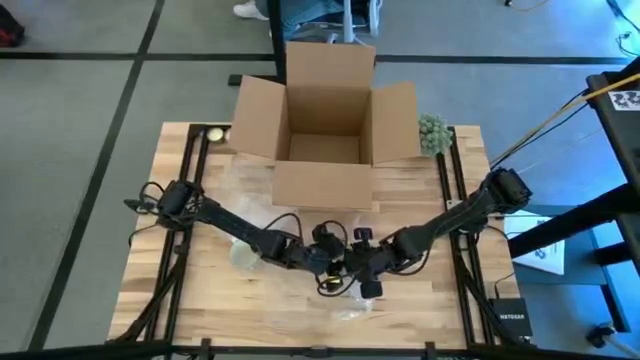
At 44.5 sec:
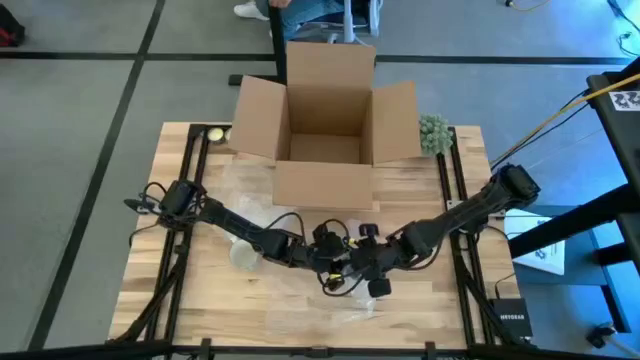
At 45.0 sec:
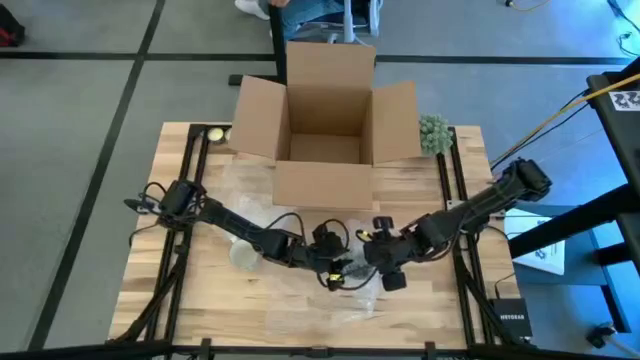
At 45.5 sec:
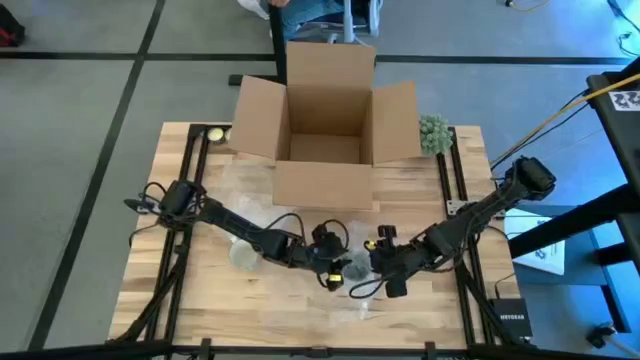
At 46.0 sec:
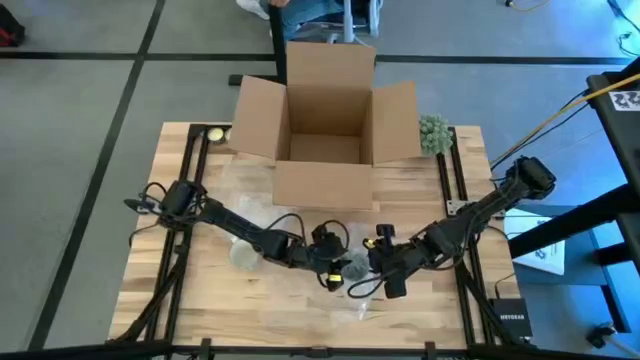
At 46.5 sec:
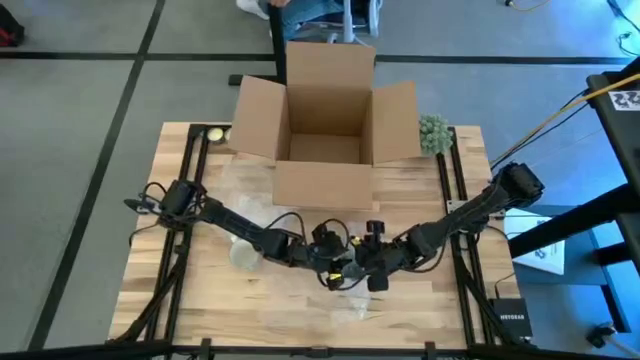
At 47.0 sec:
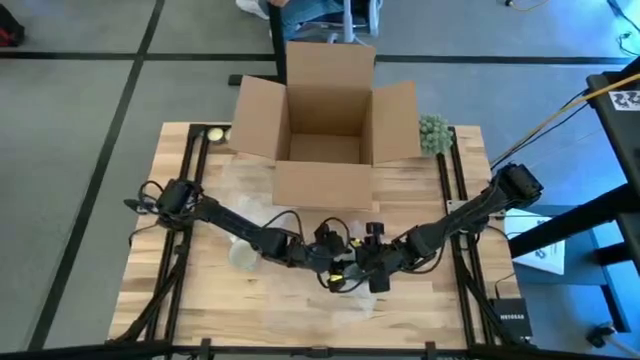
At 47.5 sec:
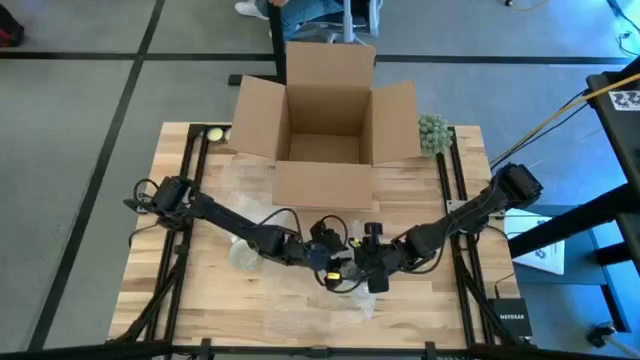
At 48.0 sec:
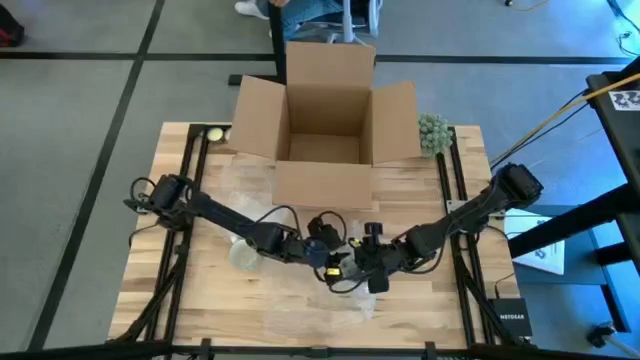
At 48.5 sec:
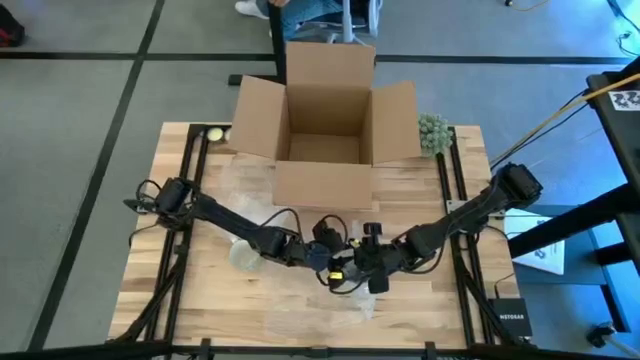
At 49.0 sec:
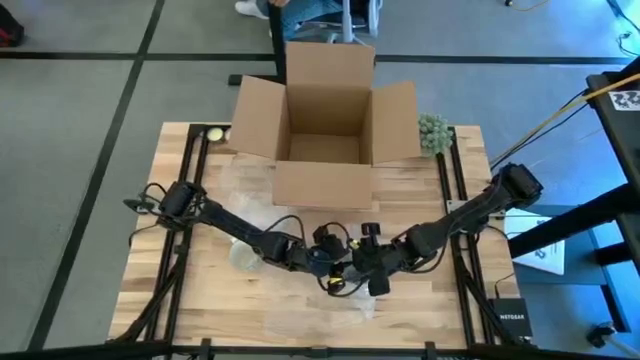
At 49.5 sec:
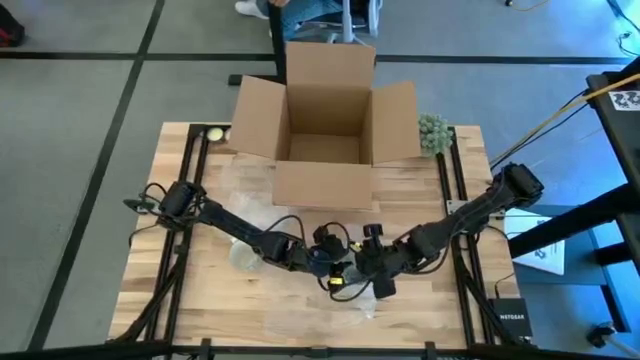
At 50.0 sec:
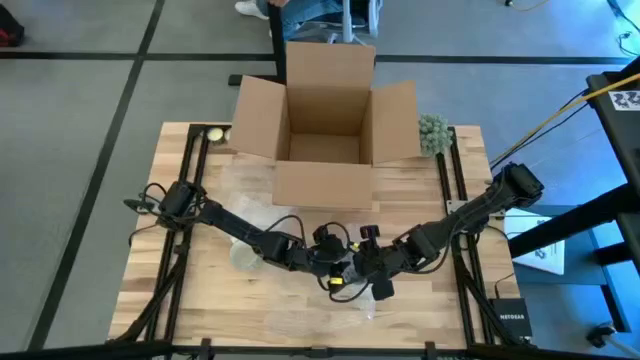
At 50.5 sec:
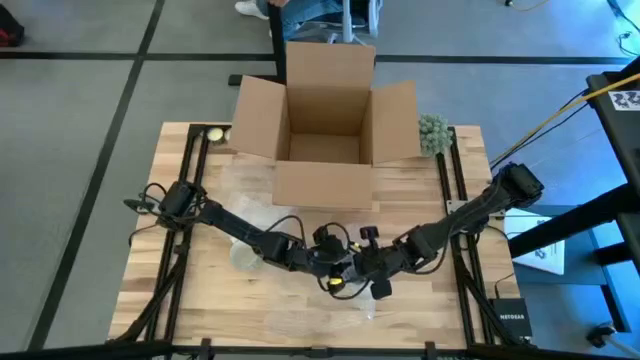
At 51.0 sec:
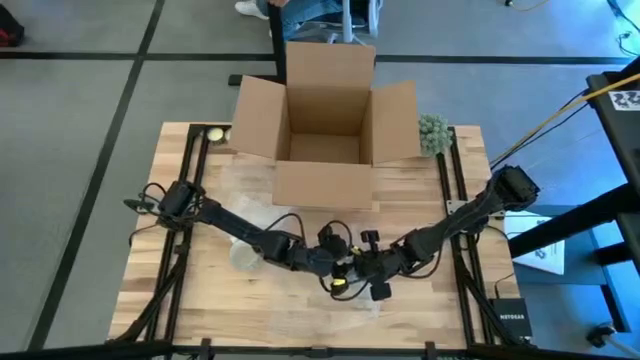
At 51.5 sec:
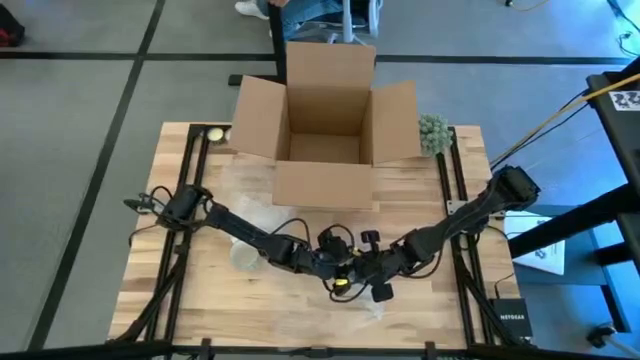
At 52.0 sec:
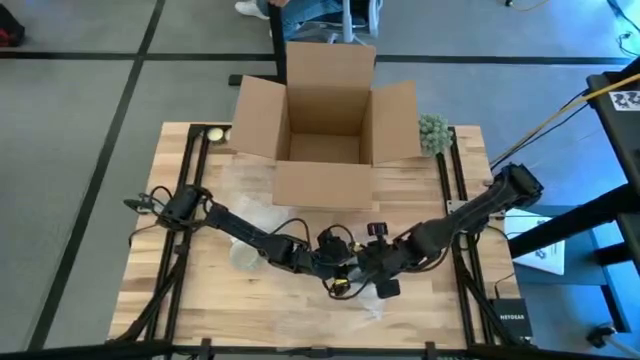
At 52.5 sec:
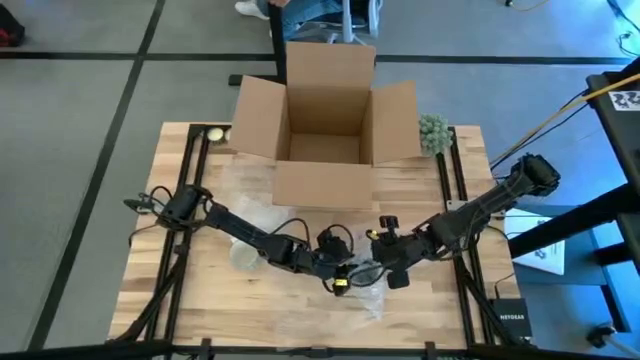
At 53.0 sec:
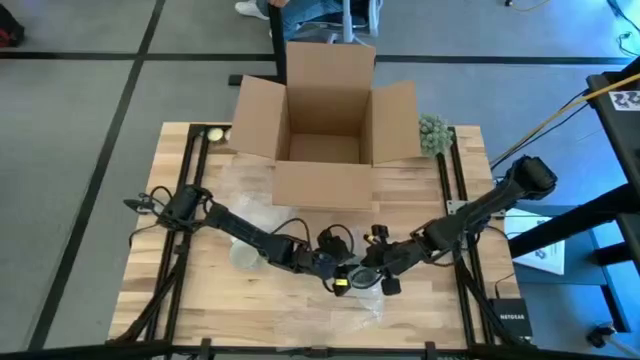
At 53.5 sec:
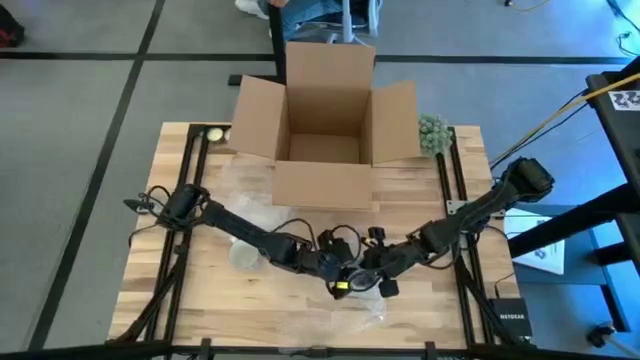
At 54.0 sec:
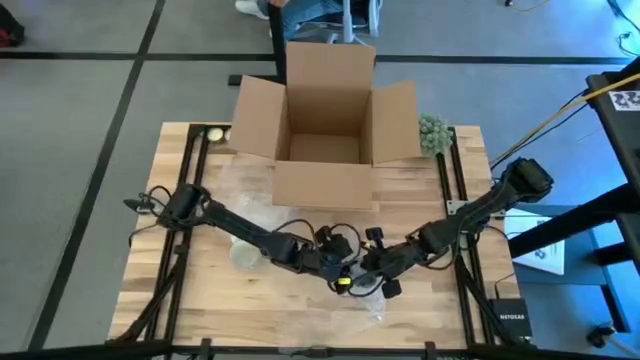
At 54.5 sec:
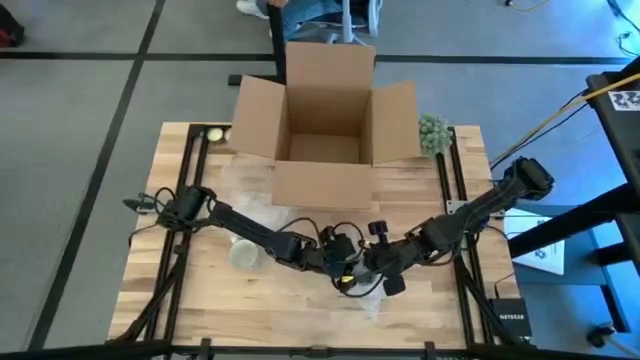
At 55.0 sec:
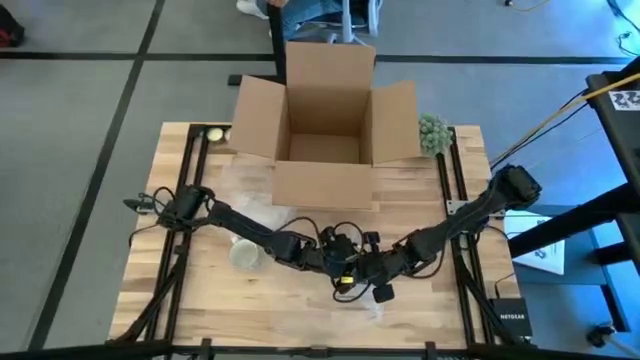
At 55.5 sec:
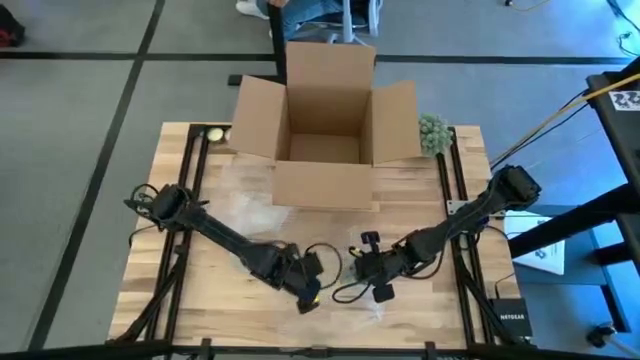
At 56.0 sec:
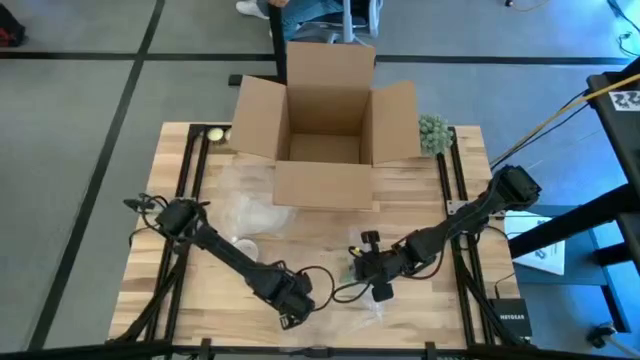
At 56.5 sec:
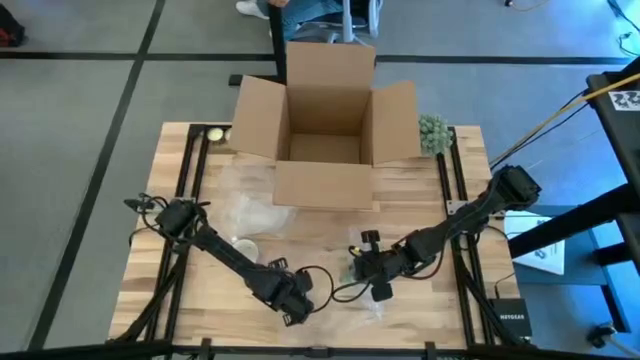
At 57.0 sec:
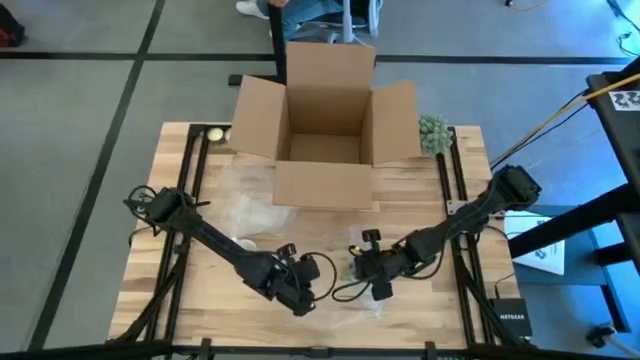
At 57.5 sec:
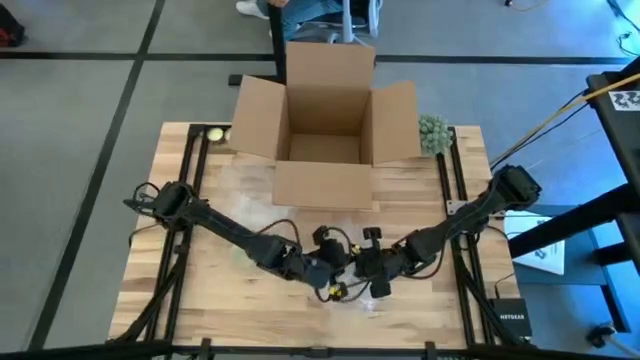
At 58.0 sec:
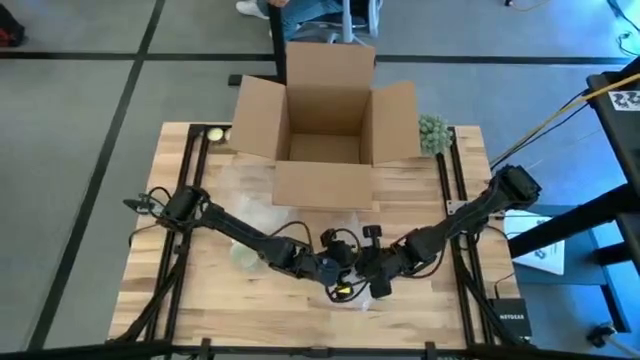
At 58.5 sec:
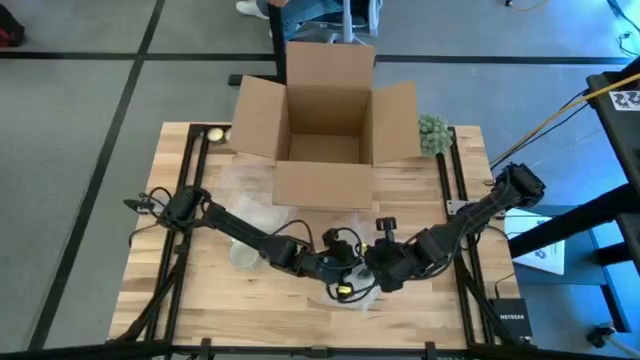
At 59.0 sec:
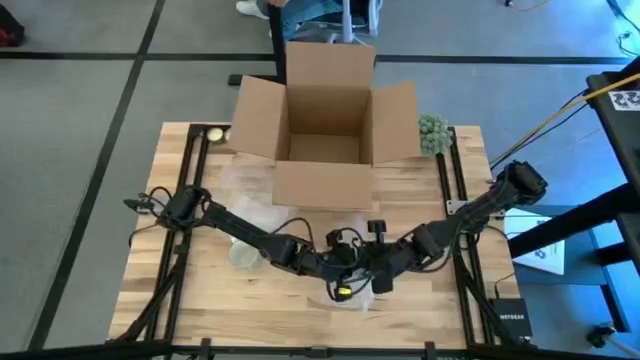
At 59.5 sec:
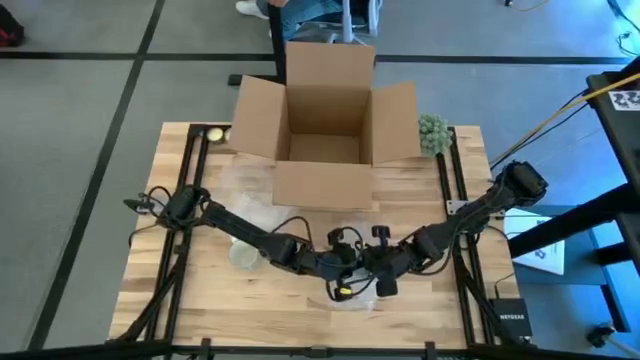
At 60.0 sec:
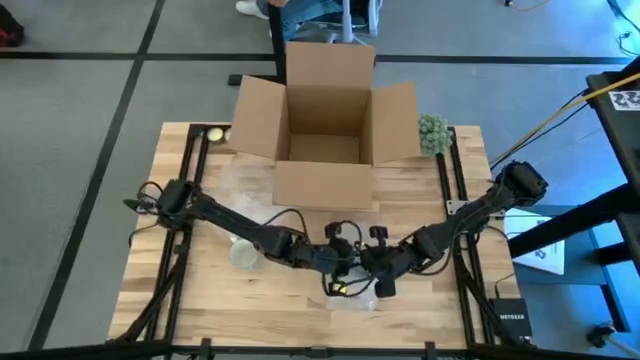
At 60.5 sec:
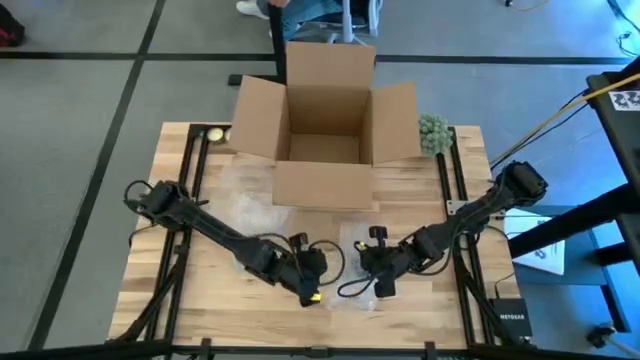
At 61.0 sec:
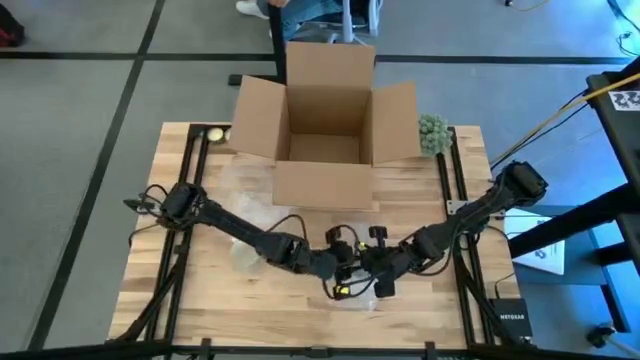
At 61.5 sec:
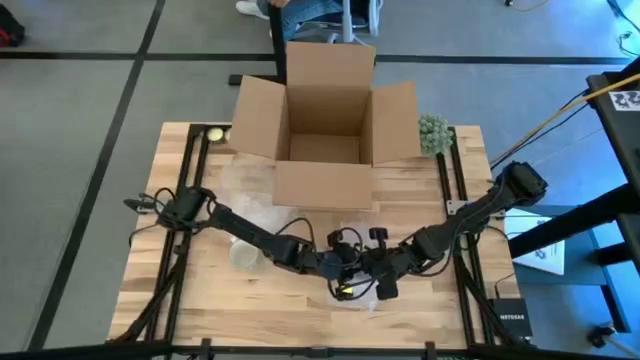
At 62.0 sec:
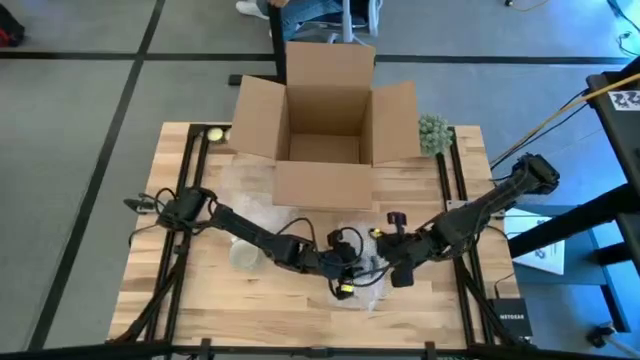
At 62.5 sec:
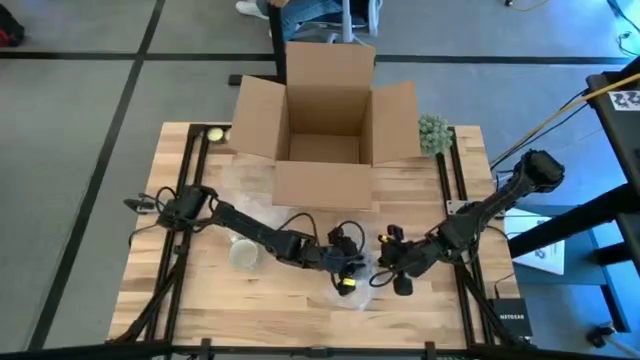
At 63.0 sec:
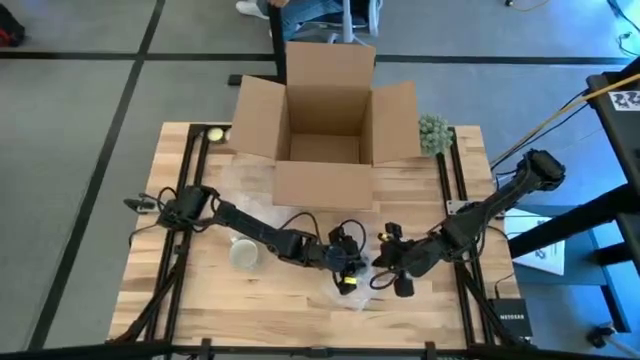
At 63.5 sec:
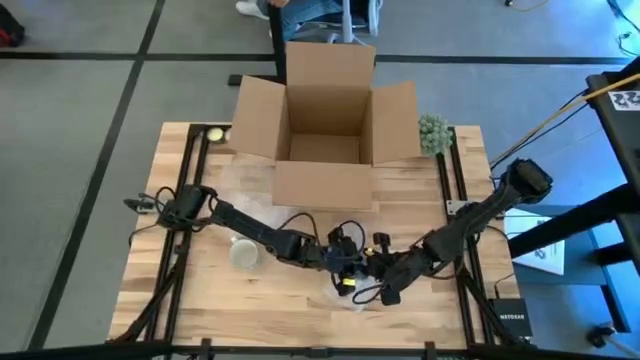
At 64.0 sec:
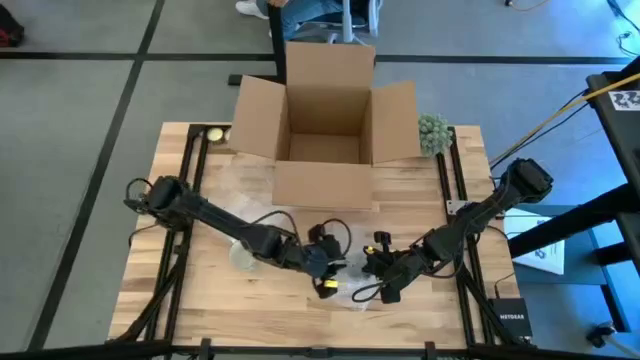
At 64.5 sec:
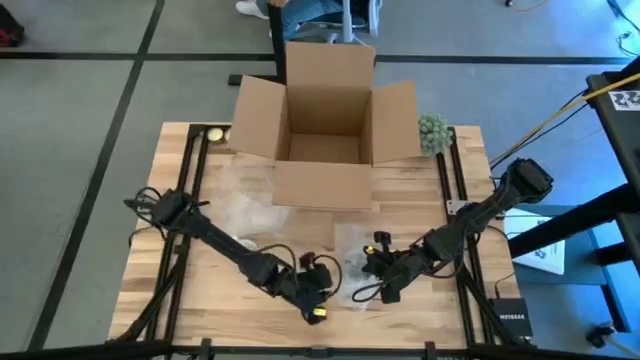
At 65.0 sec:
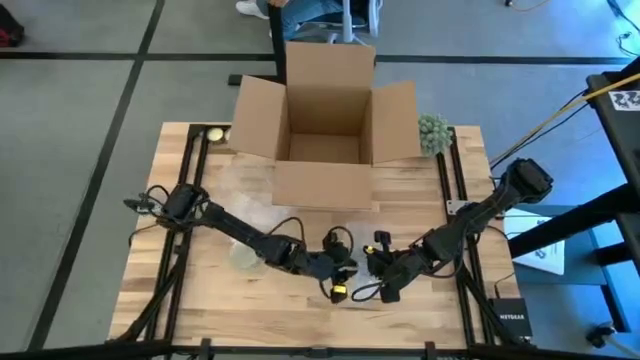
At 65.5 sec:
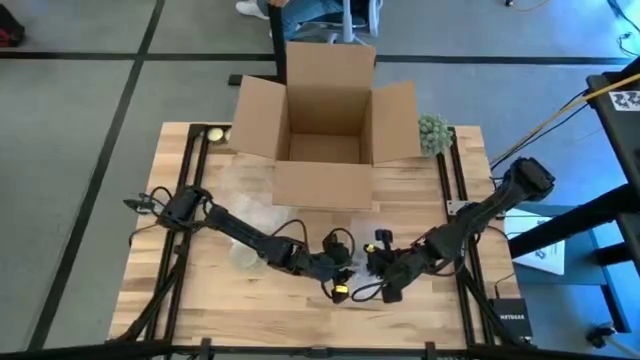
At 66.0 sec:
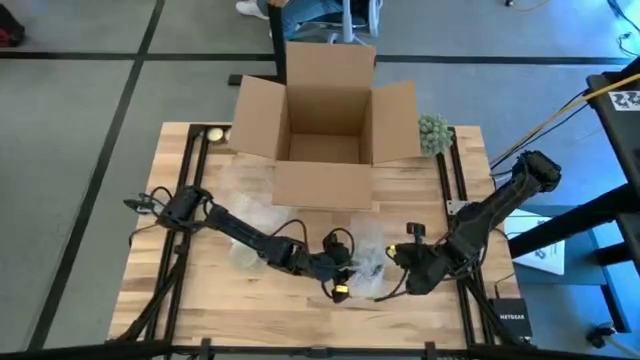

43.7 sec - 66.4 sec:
Task: wrap mug
Wrap the green mug with the bubble wrap
